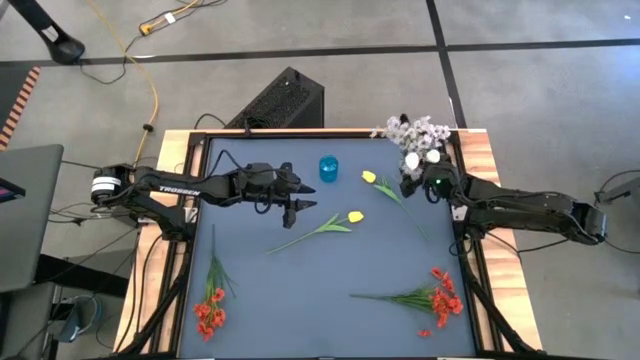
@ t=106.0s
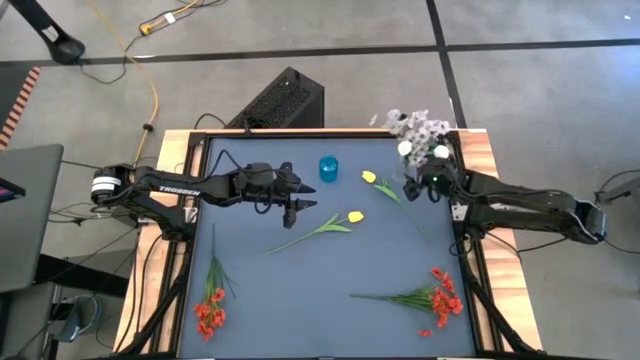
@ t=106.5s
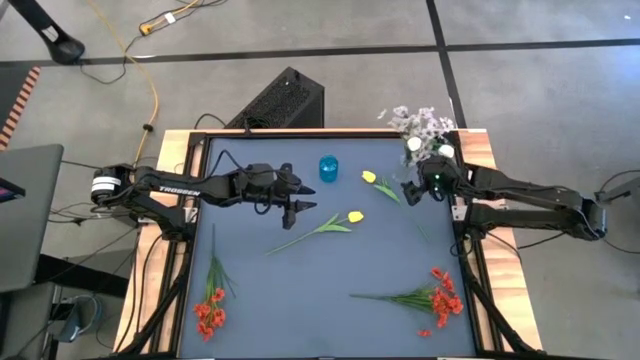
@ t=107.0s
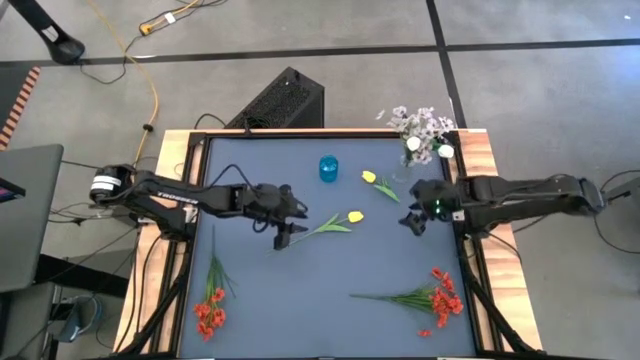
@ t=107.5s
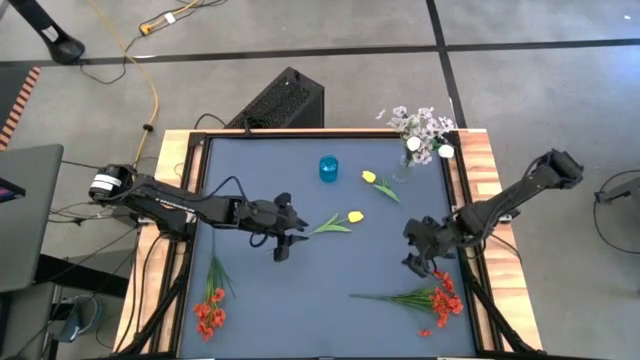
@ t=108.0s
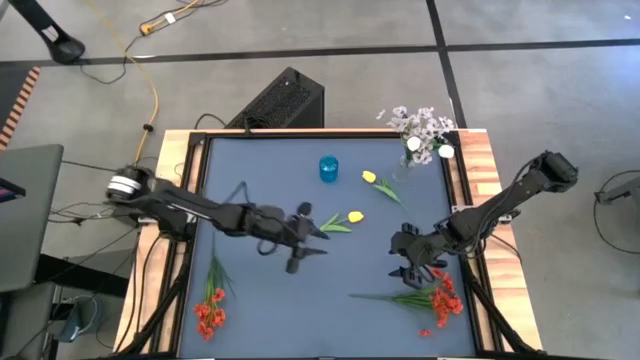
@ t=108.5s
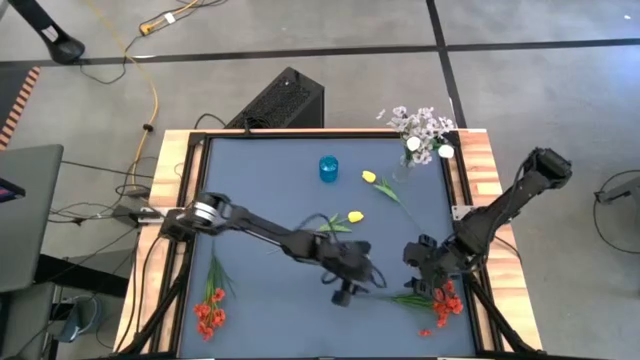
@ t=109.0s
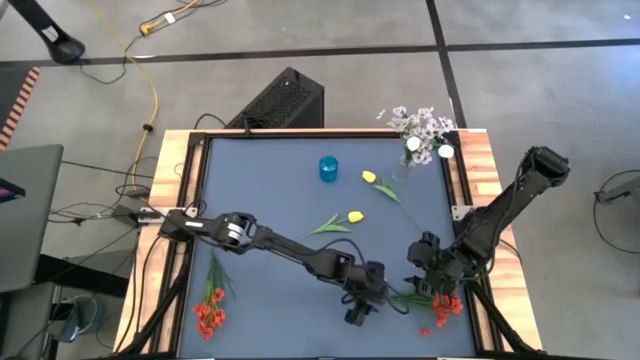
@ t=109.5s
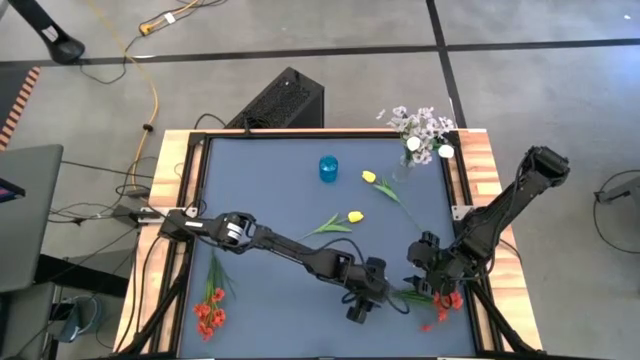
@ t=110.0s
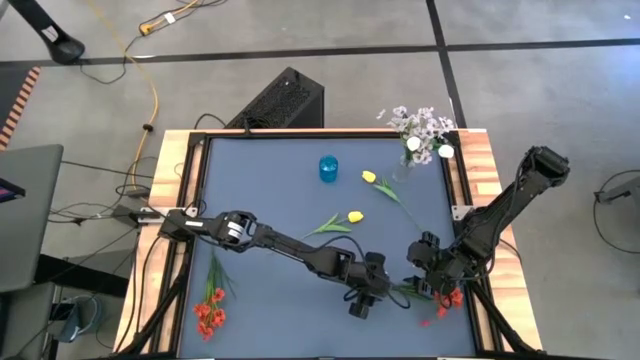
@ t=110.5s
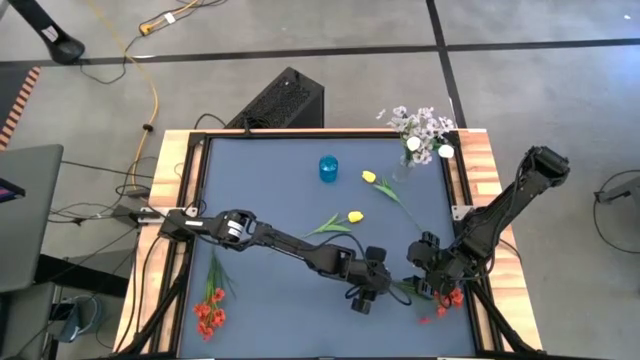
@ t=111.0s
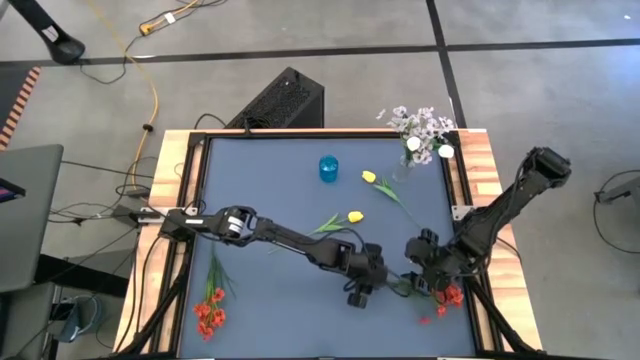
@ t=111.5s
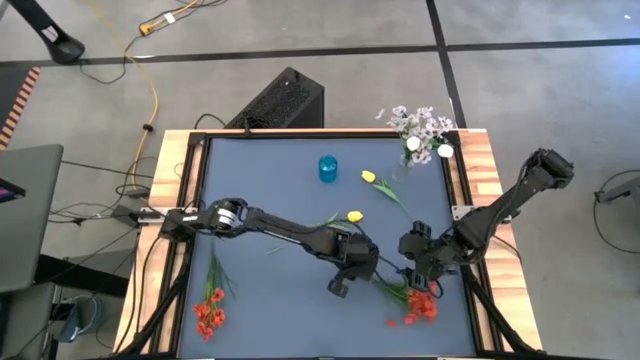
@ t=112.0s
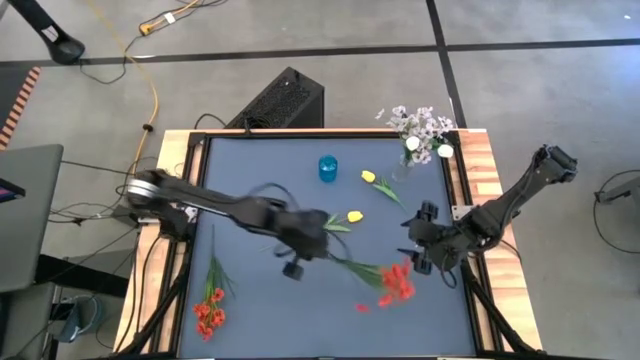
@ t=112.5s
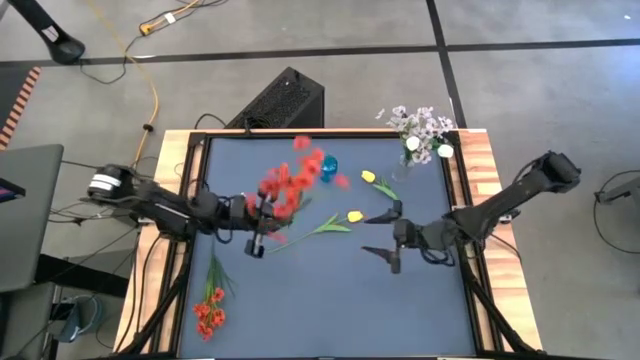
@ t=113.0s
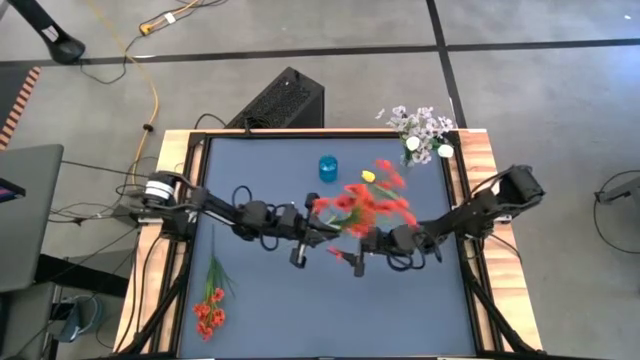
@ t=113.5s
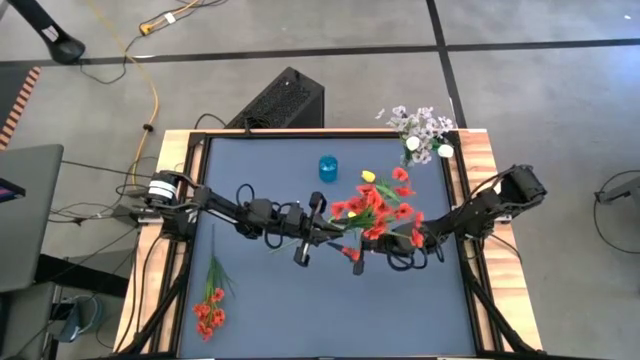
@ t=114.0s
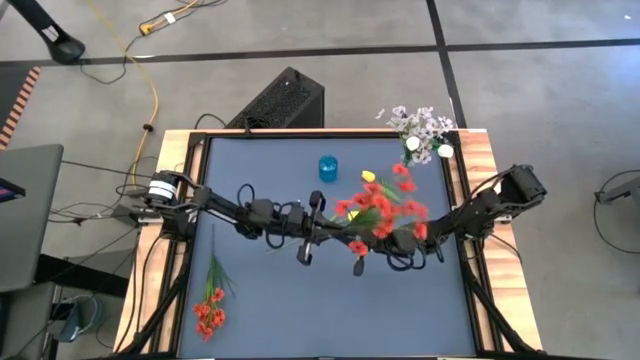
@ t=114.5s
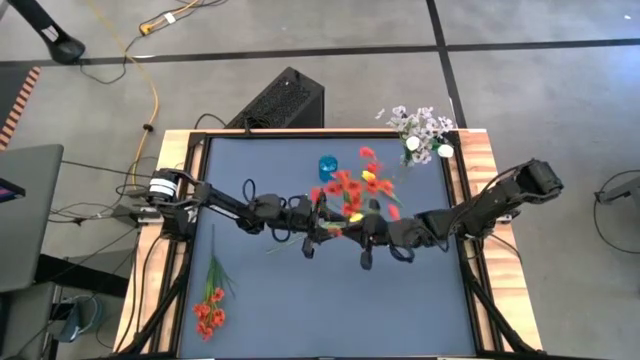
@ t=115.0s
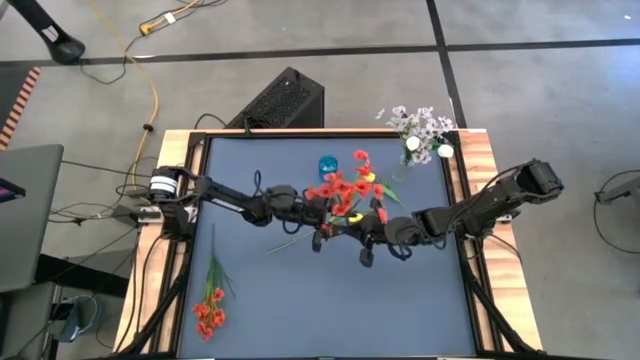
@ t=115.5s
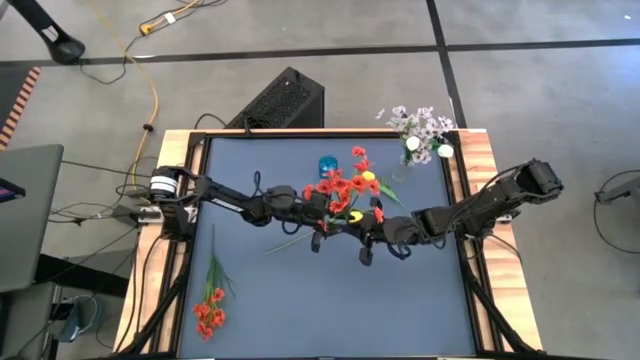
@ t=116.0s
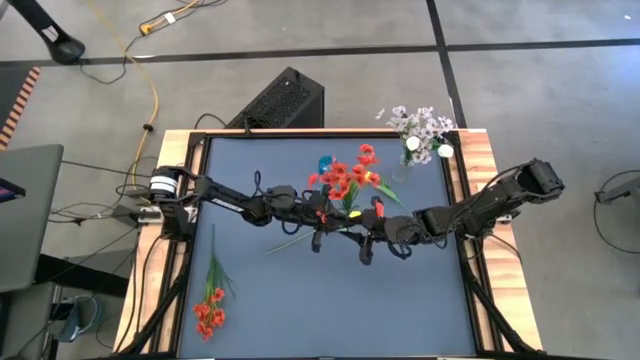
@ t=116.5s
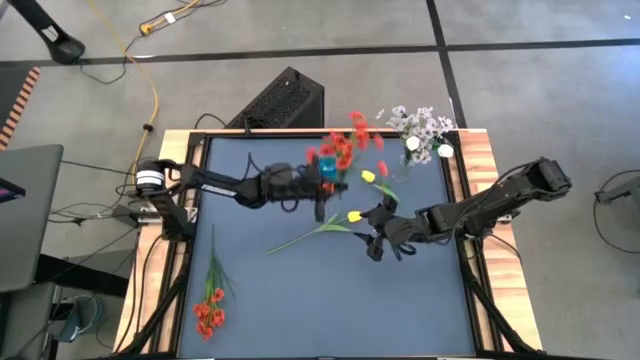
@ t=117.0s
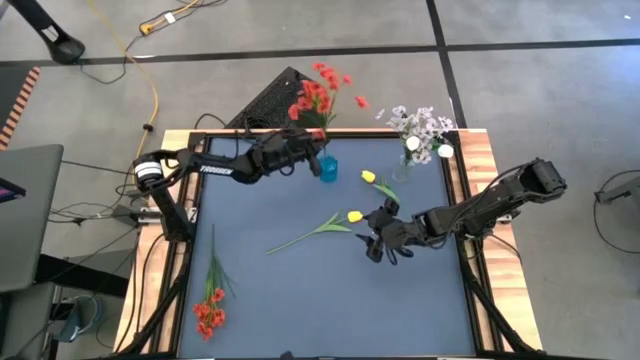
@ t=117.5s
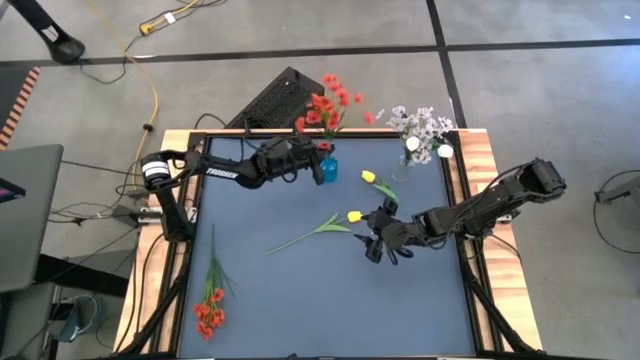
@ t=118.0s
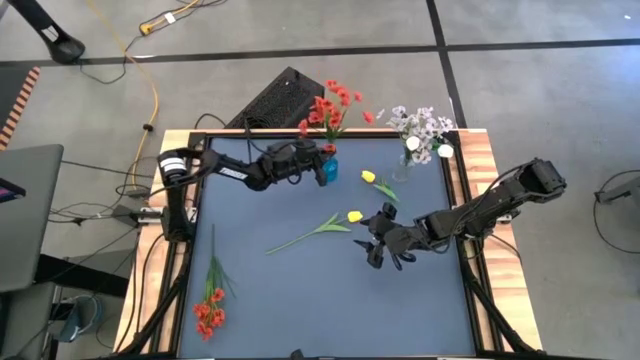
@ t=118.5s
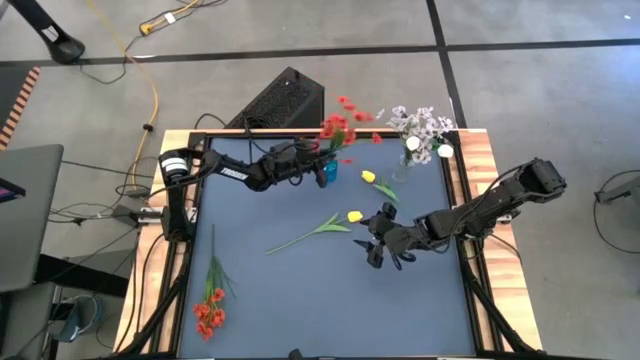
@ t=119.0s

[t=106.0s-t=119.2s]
Task: Sort flowers into vase by color
Put the right orange flowers into the blue vase
